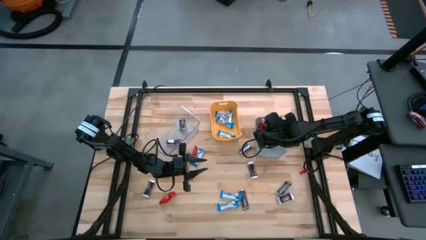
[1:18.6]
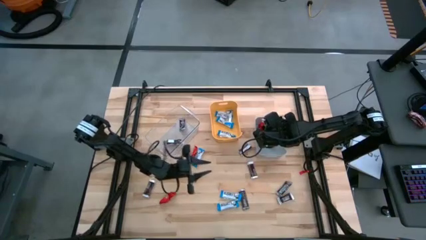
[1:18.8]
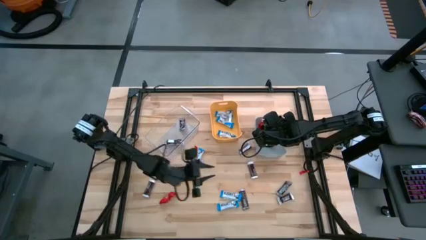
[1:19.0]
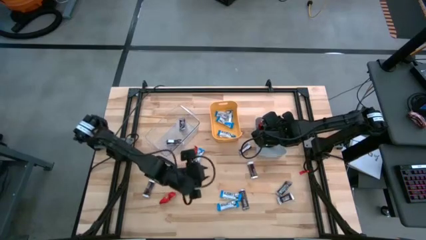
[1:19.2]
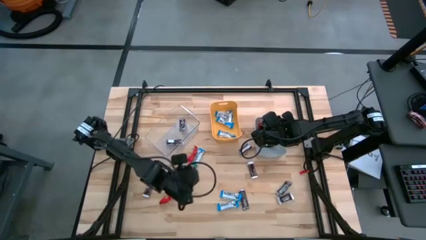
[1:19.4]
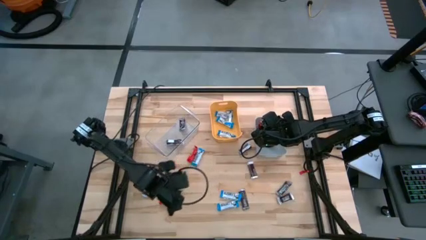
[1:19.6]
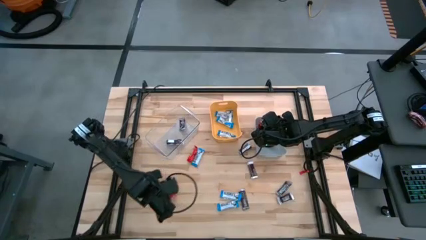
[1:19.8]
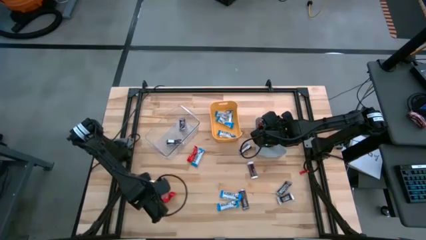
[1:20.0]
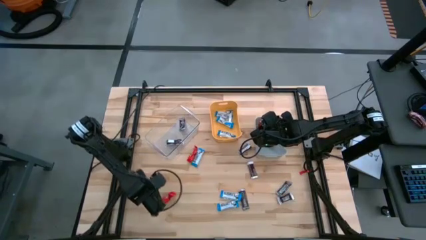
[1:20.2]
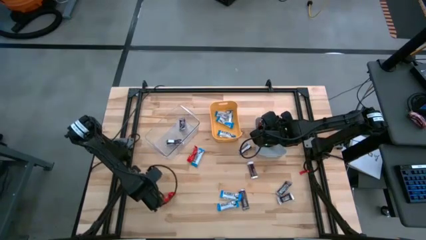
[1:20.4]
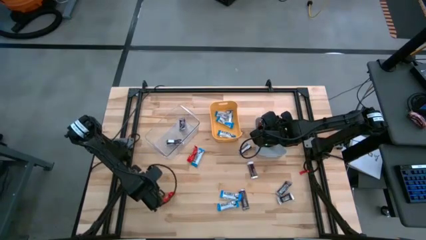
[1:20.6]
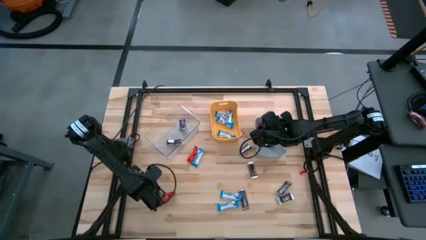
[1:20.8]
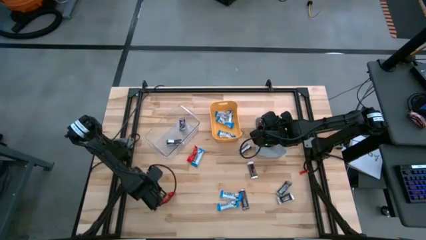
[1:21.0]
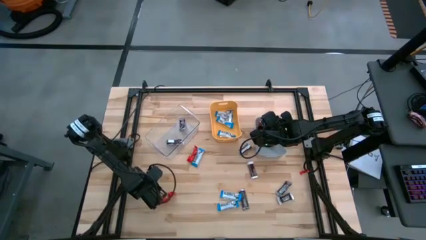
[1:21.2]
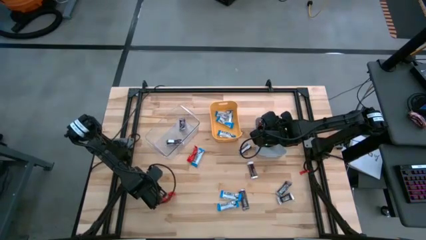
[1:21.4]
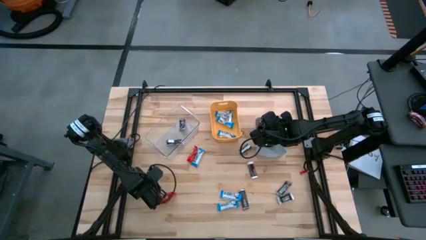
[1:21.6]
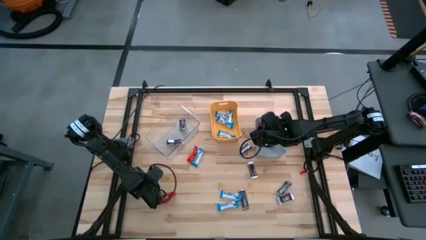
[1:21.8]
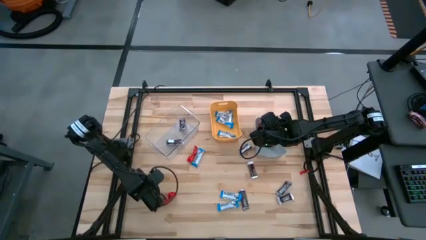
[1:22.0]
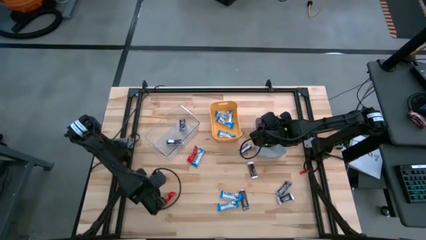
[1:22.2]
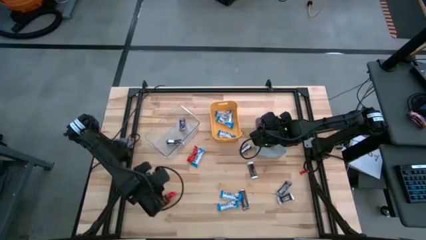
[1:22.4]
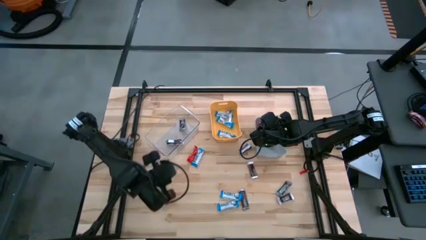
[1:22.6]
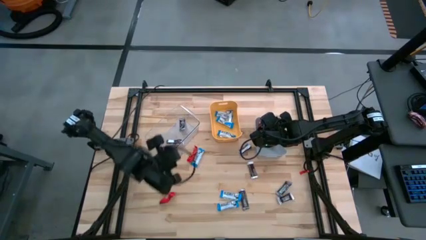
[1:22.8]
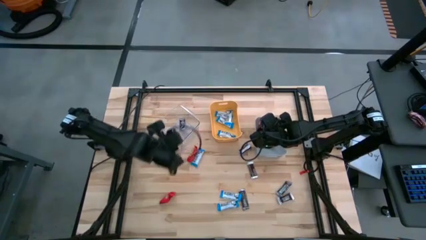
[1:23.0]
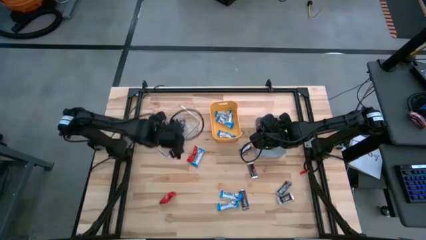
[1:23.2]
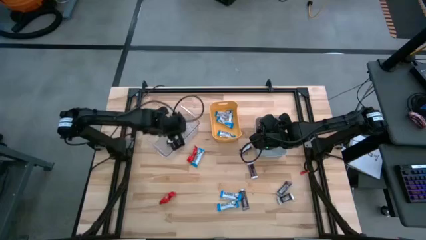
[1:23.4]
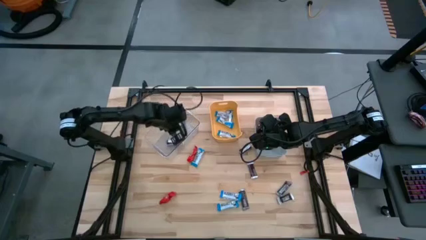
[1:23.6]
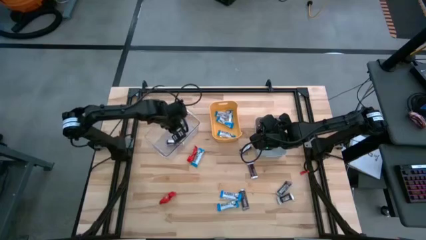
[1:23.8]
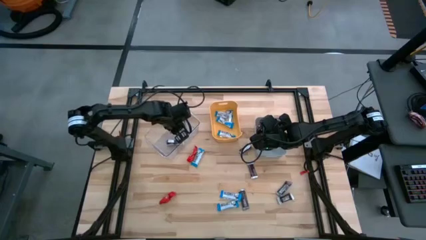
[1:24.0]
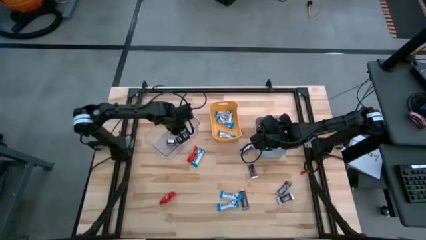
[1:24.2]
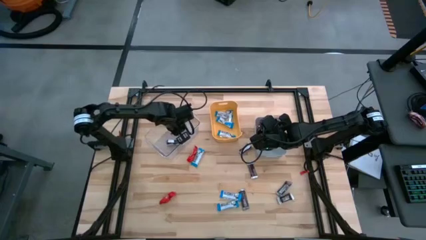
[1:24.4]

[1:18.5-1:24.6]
Task: Organize candy in baskets
Put the brown chocolate into the transparent bin

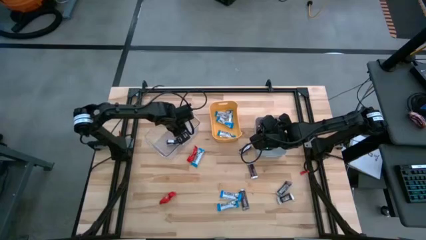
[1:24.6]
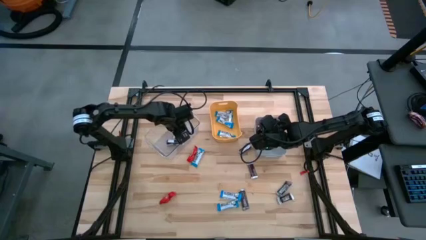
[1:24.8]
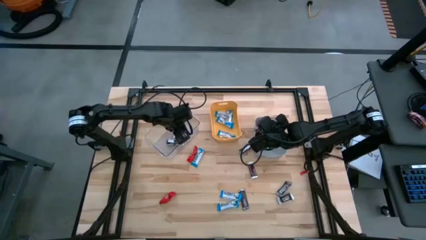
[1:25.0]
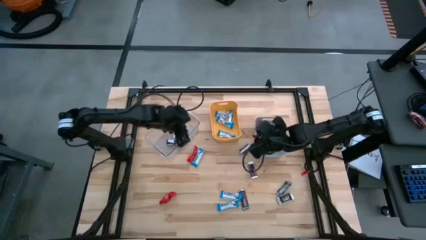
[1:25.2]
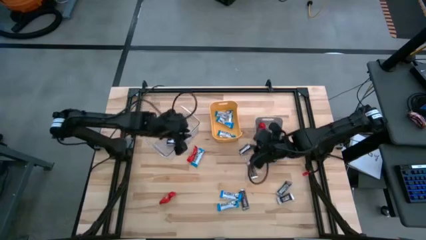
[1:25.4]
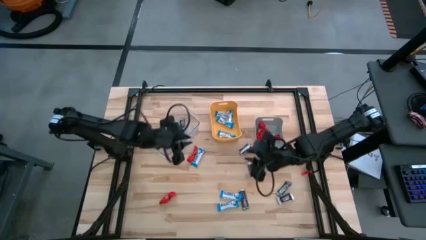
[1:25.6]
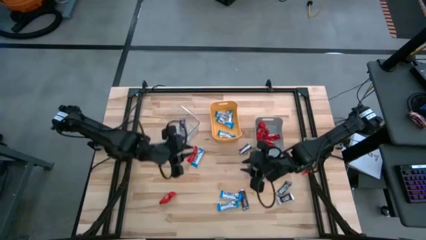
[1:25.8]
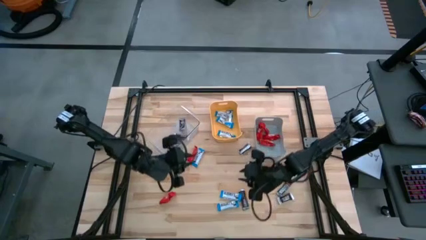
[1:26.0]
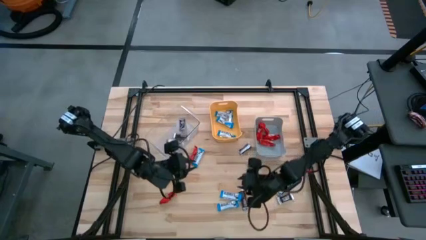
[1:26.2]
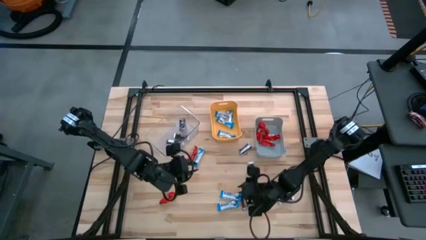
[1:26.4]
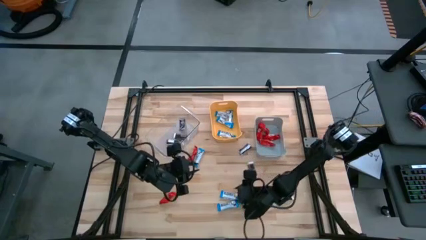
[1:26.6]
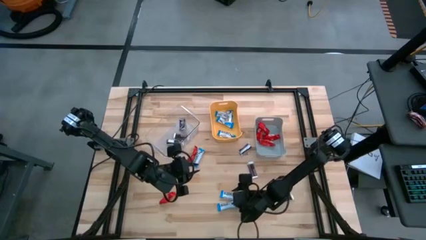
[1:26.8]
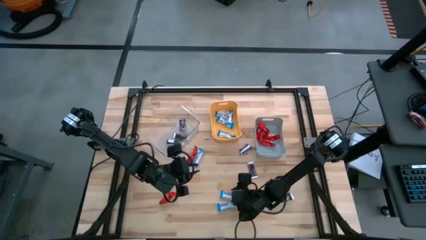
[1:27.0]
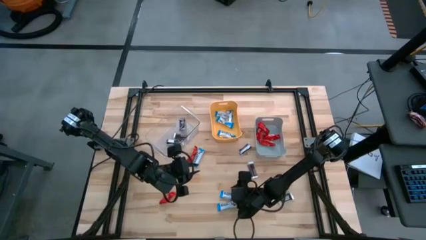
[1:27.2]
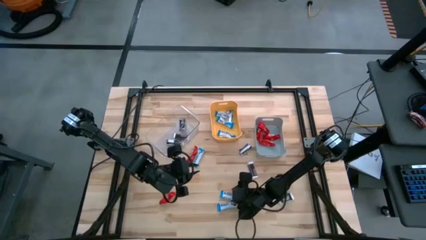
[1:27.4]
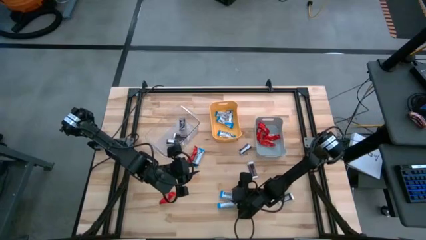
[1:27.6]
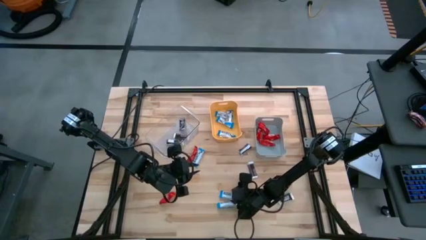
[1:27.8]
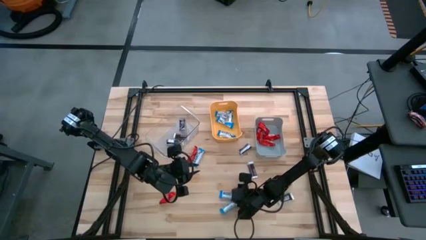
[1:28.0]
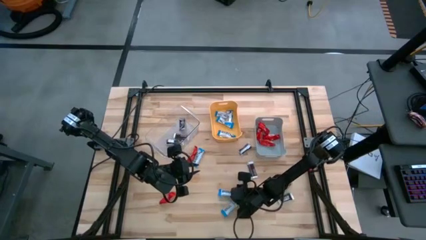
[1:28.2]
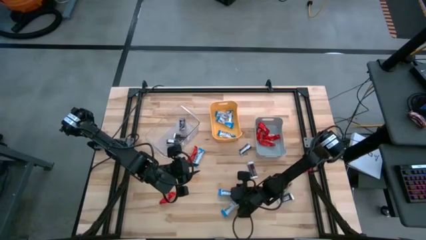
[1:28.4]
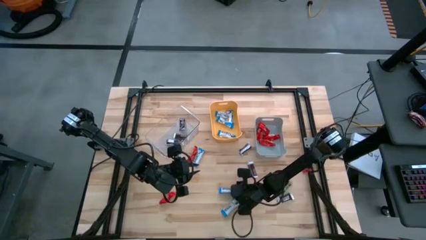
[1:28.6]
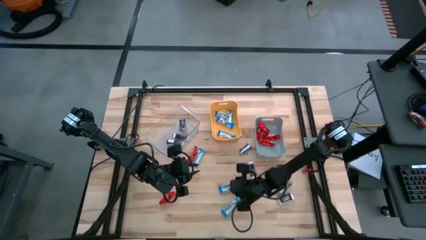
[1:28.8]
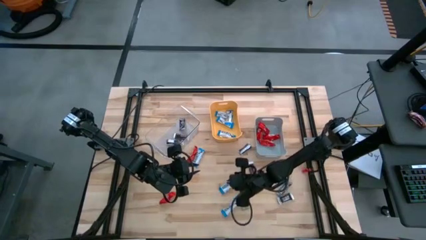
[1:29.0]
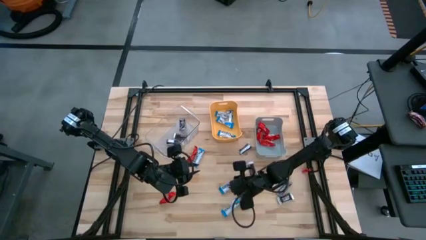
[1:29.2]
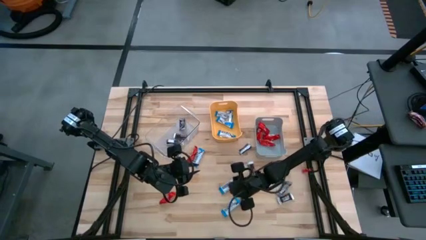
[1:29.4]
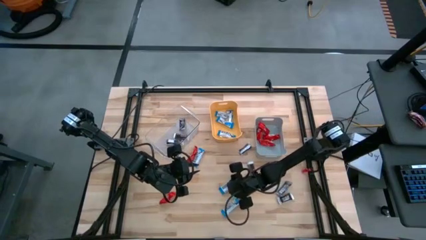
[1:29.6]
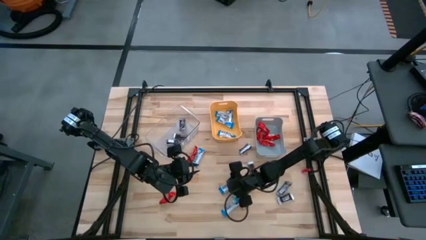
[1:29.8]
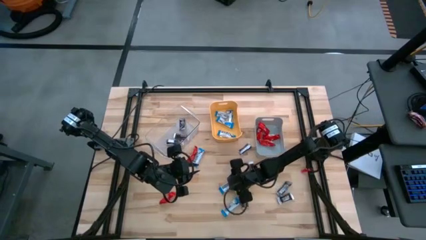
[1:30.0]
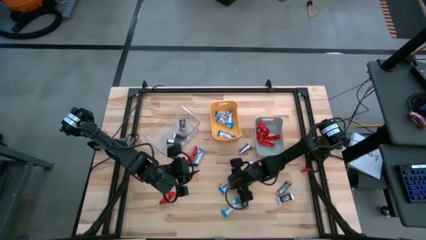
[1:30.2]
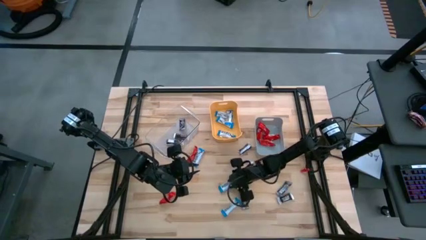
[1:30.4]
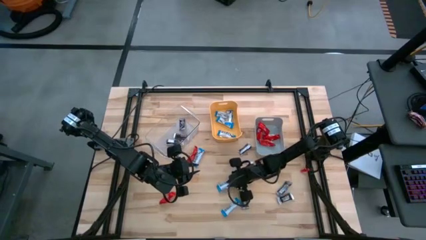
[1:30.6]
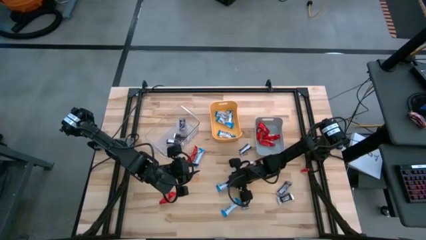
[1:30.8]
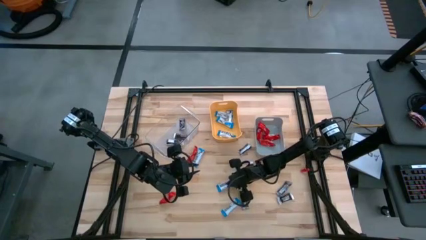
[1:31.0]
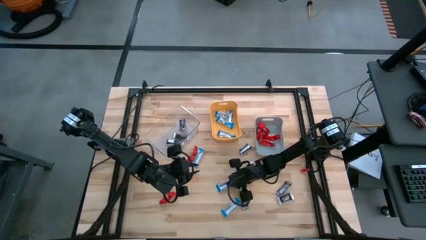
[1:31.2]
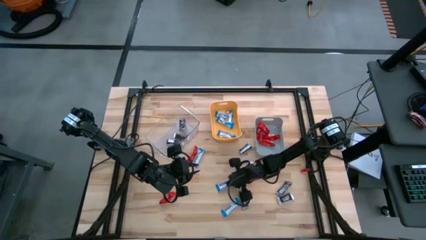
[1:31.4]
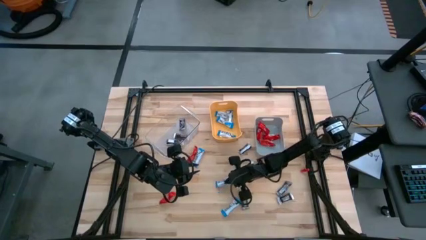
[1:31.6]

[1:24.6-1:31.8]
Put the white chocolate into the yellow bin

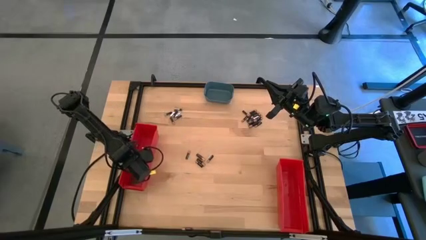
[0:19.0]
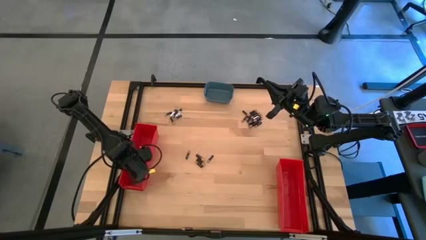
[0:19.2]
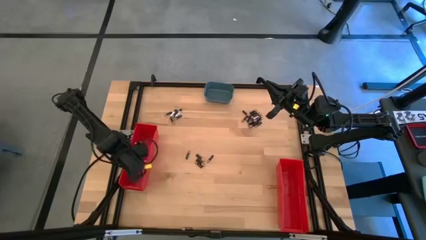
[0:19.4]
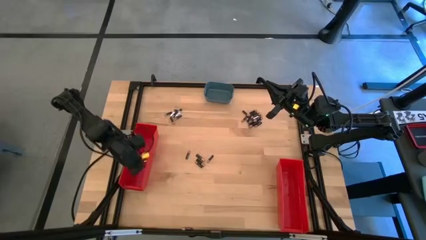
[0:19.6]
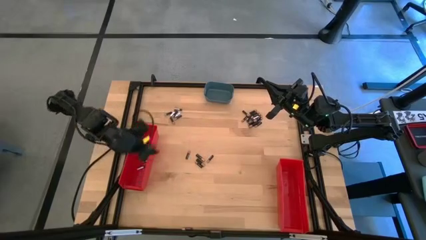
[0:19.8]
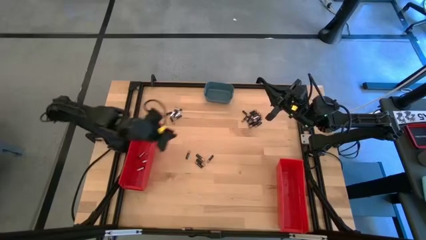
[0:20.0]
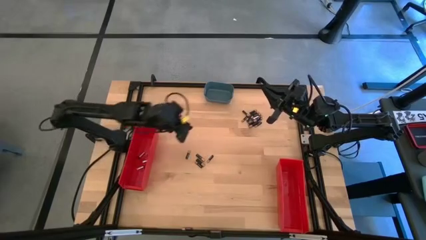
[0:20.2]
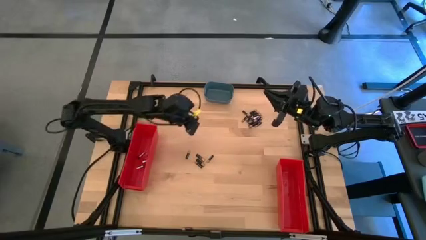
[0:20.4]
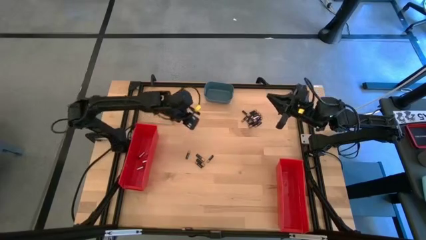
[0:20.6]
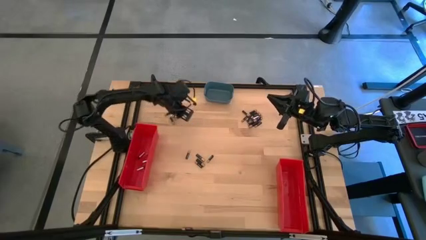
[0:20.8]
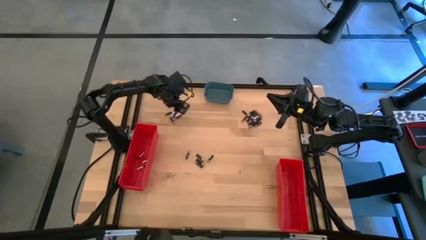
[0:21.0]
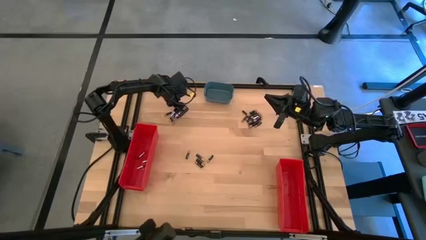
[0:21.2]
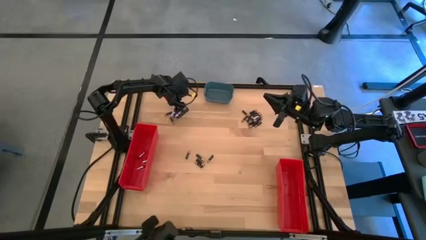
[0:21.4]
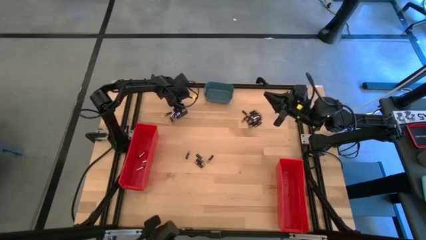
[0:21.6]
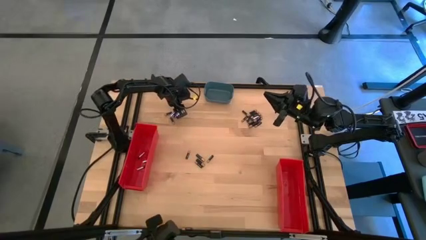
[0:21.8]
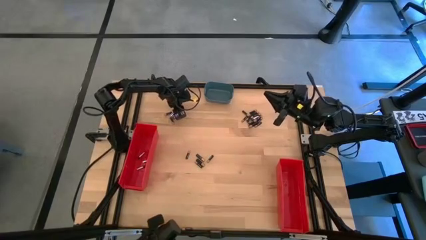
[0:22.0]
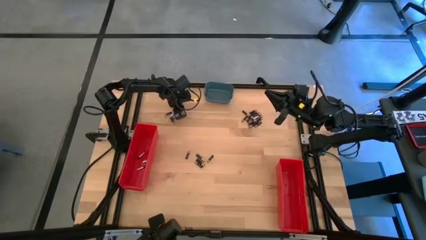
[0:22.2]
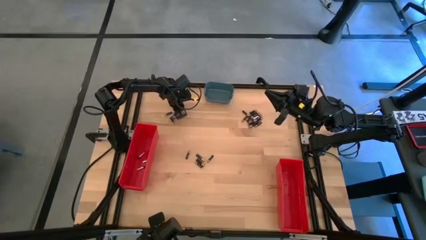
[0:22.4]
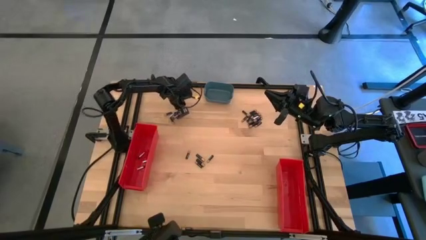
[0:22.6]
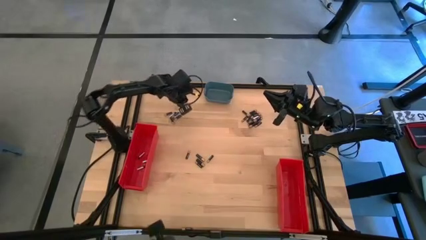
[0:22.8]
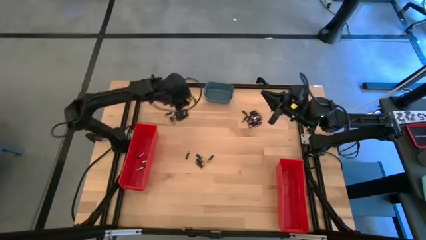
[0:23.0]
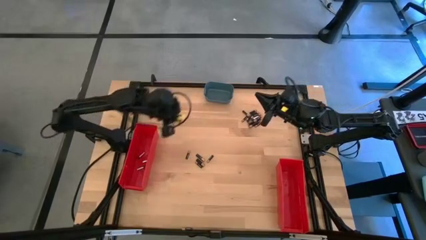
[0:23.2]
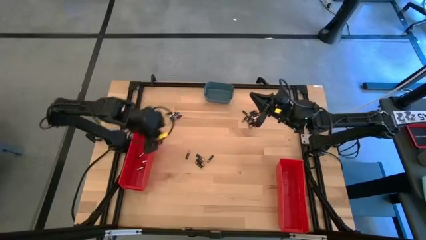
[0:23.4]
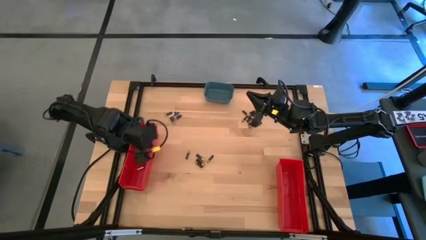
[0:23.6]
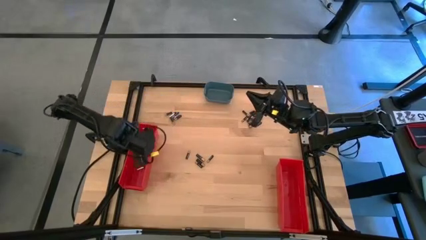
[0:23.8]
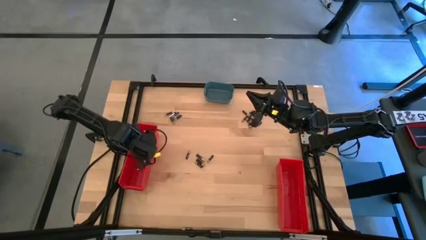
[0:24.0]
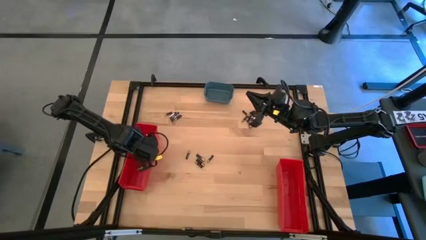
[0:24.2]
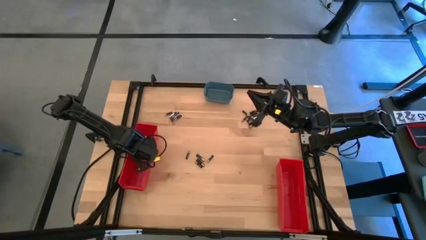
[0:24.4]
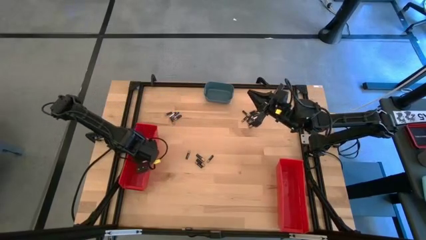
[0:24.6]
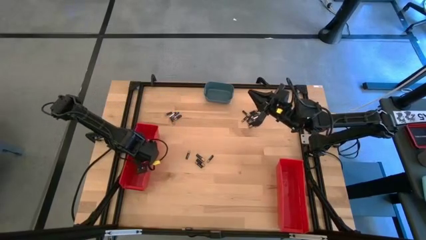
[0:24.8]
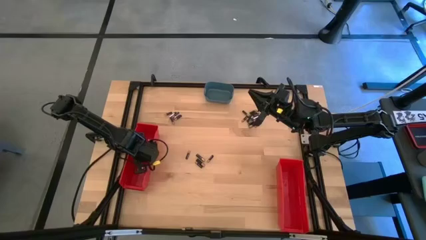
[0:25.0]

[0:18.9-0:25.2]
Task: Sort batteries
Put the silver battery into the left red bin
